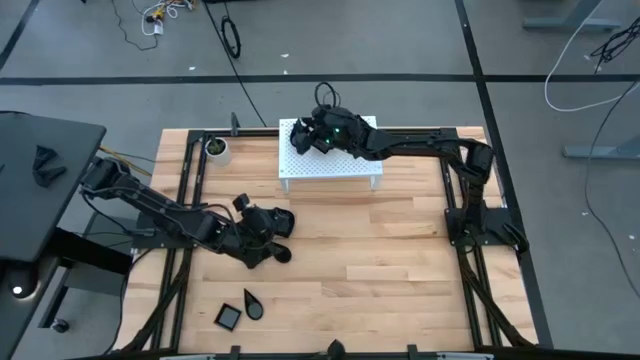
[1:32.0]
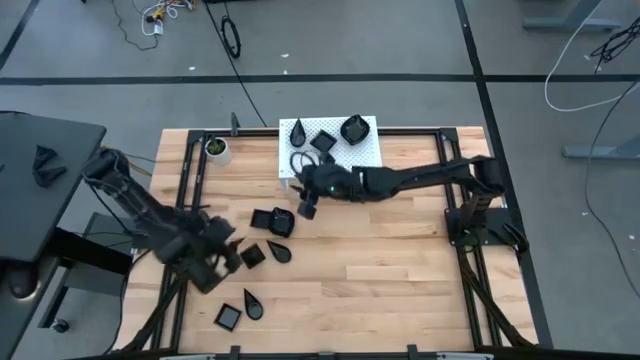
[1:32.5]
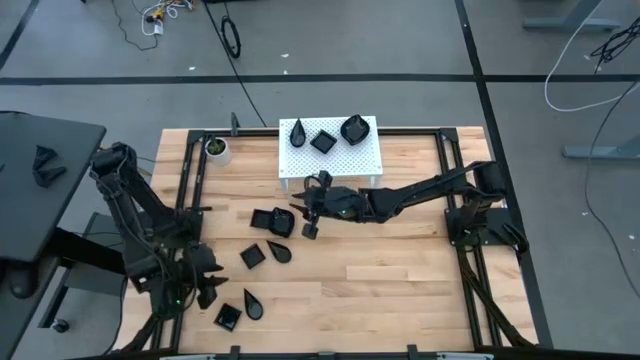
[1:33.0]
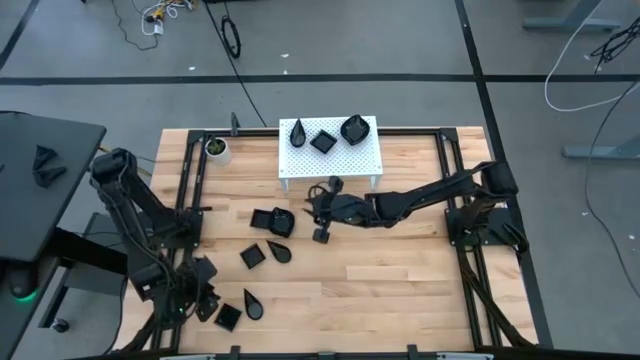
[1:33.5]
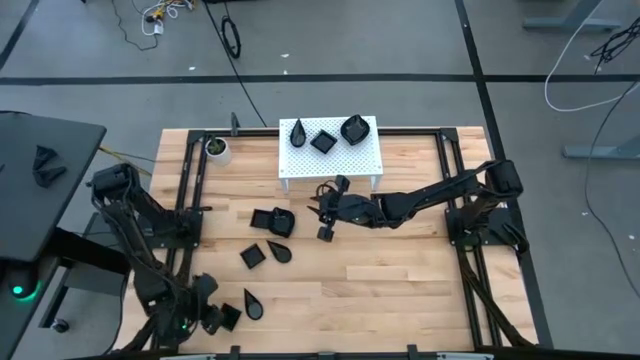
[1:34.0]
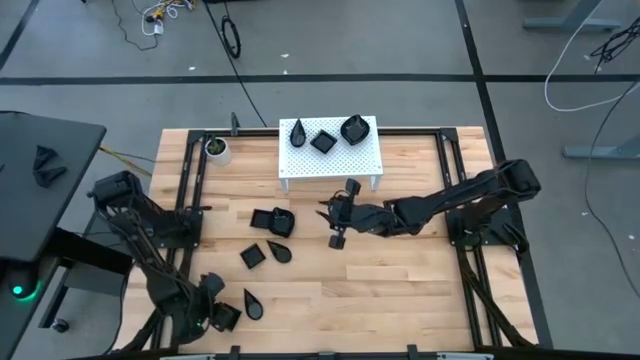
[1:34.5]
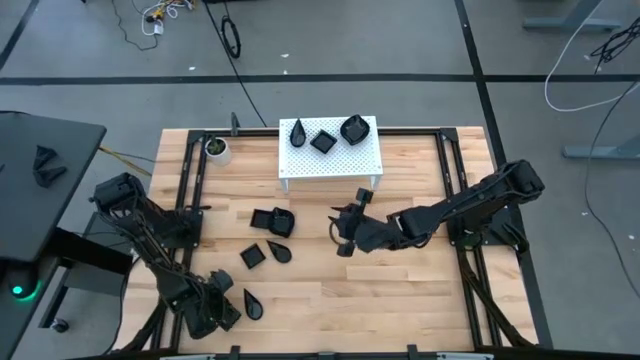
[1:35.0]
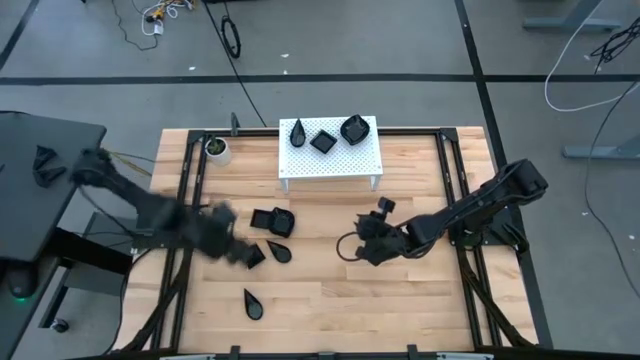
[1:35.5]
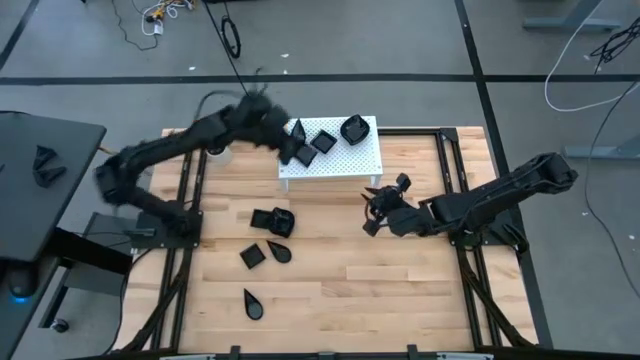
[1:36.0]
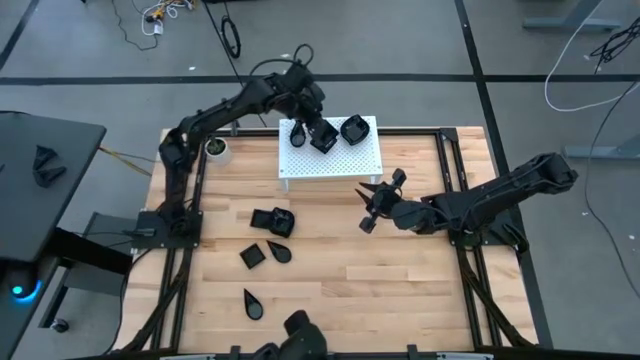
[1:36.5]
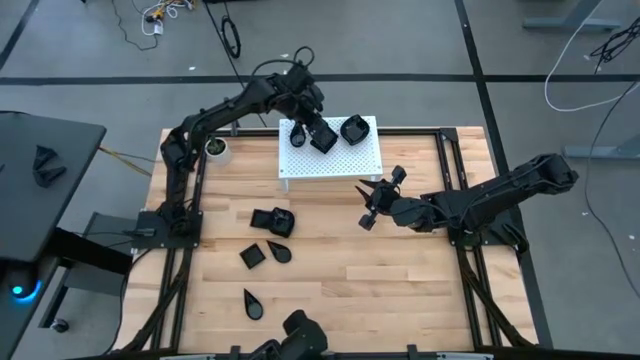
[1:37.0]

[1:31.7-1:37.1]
Task: Pick & Place Mini shaped plates
Stack the black square plate on top of the other black square plate on the shelf

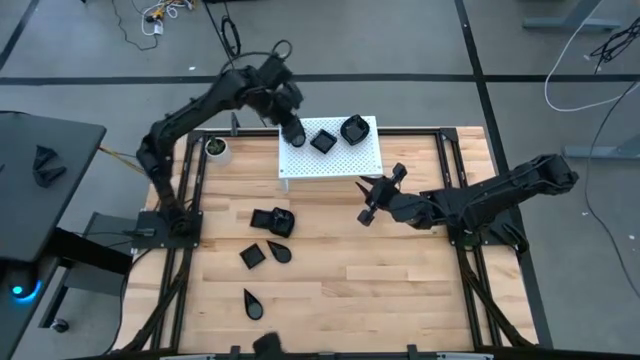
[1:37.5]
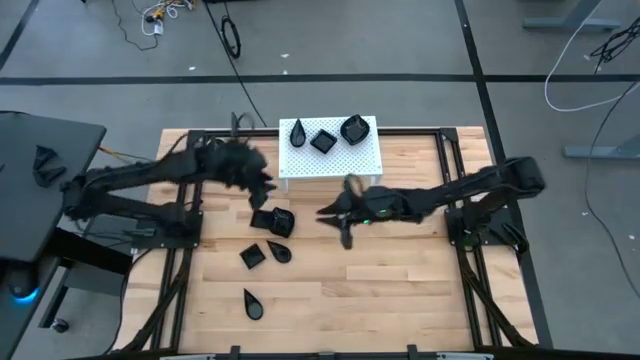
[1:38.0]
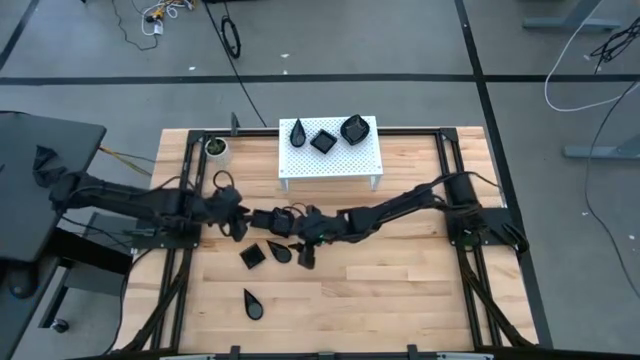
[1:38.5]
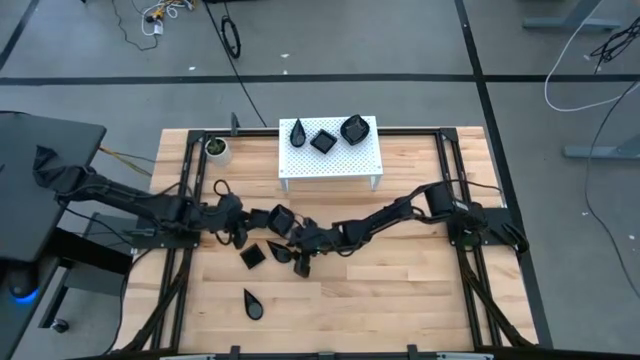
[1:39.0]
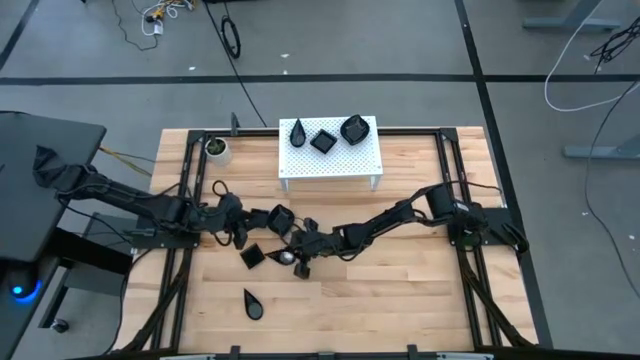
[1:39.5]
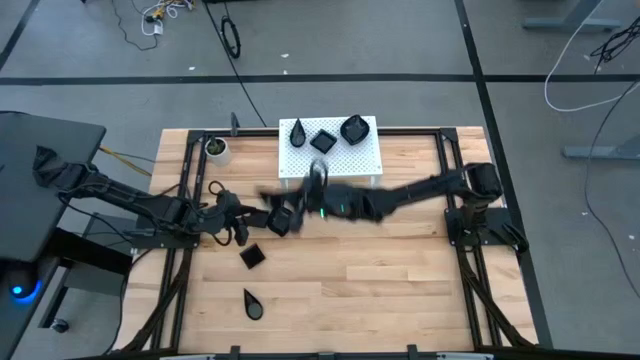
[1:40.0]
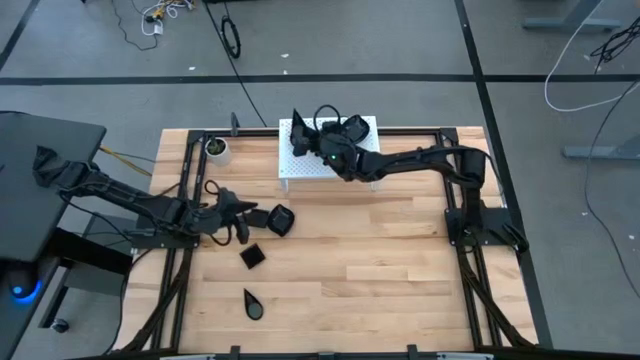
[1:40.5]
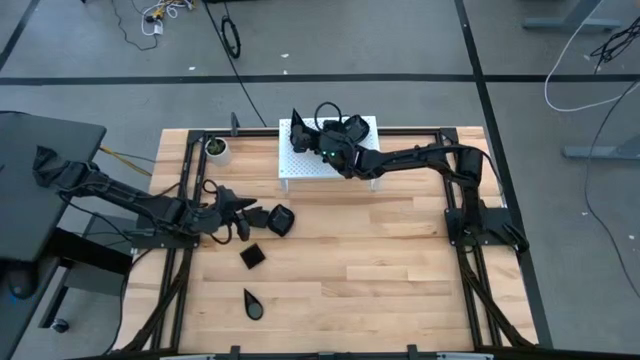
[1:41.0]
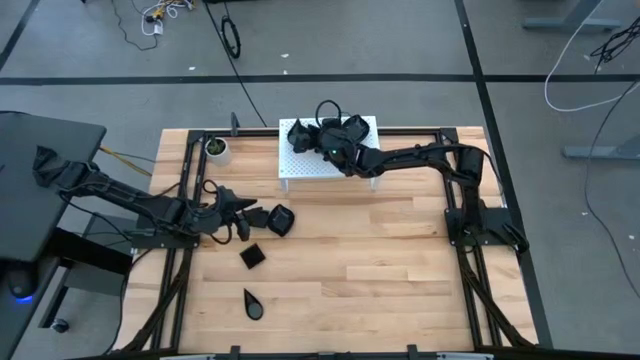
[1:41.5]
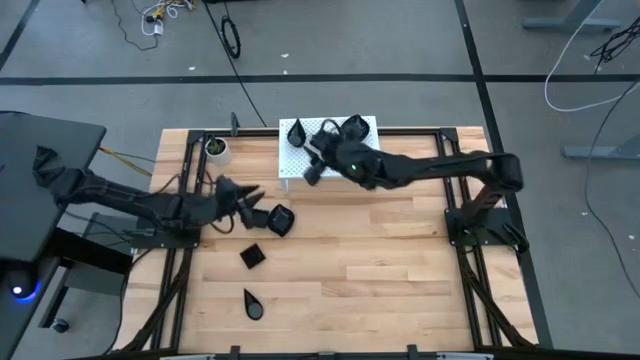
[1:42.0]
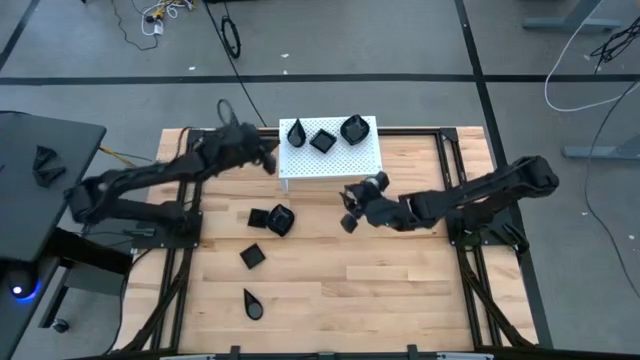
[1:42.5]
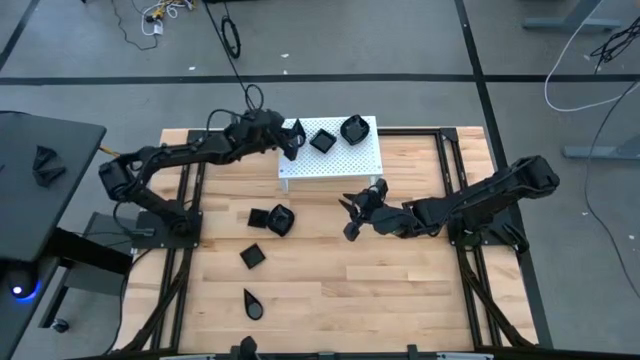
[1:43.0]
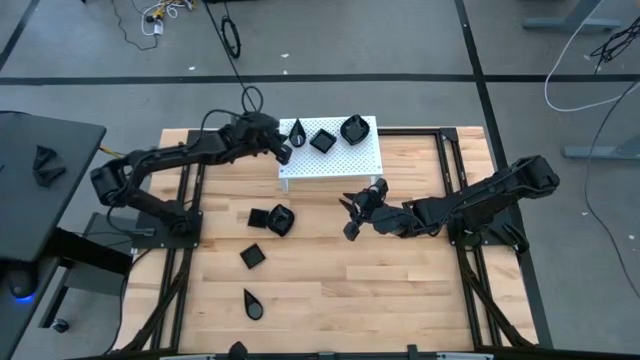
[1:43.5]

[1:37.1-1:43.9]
Stack the black drop-shaped plate on top of the other black drop-shaped plate on the shelf

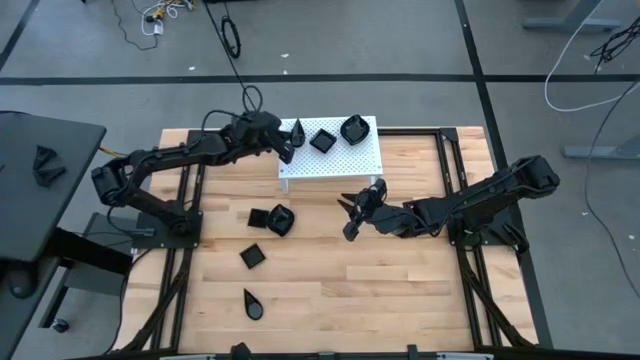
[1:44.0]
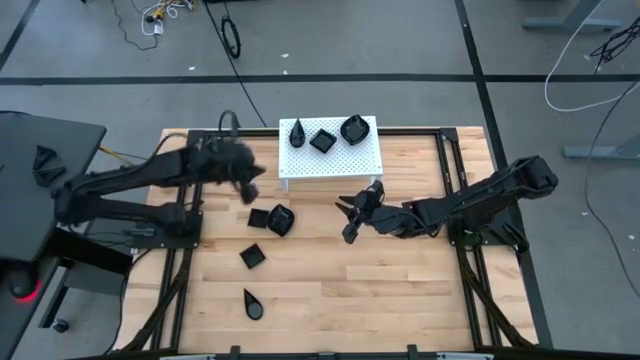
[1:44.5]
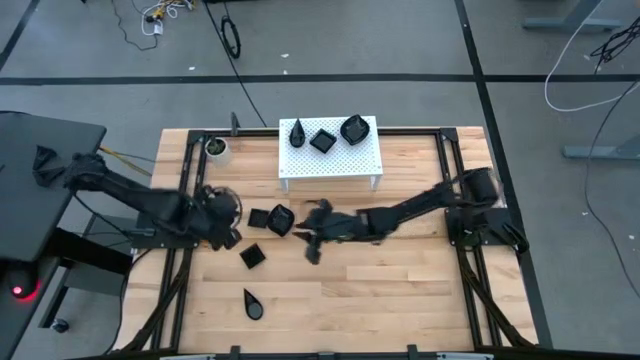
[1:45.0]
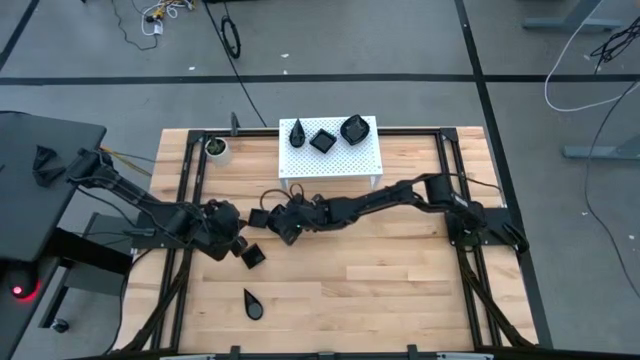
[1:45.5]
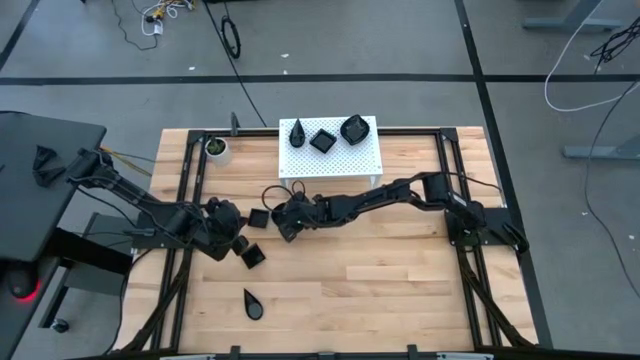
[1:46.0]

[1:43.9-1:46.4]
Stack the black leaf-shaped plate on top of the other black leaf-shaped plate on the shelf

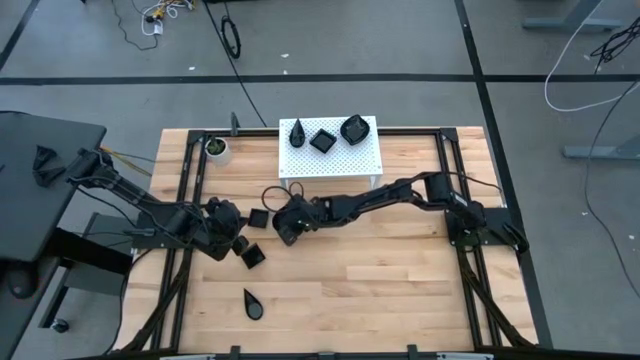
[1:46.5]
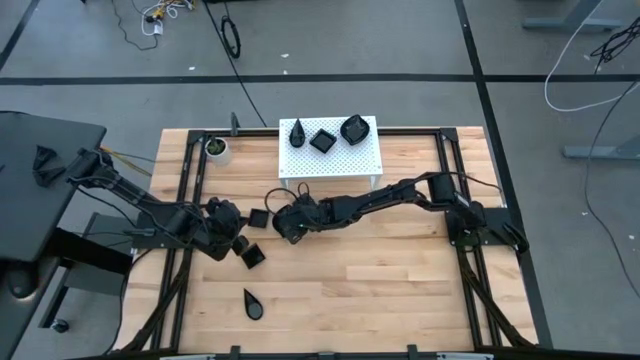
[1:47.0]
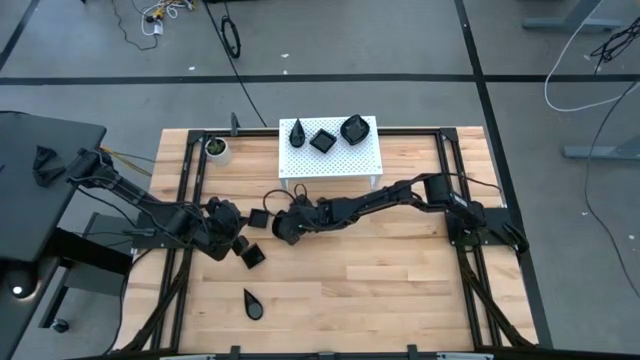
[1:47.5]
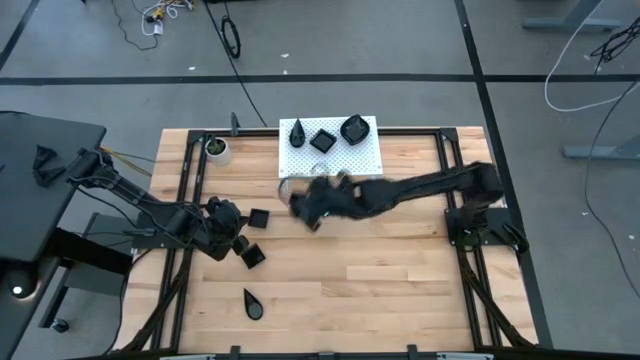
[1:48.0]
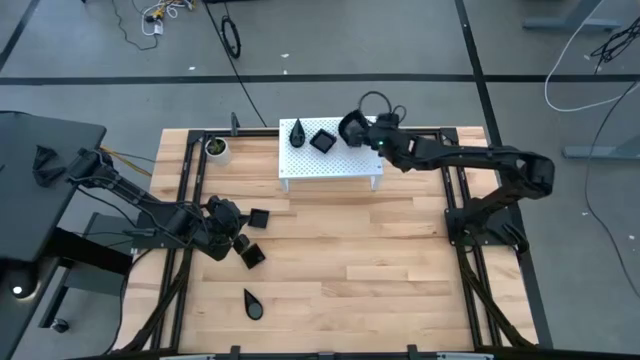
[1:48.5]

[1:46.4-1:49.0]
Stack the black leaf-shaped plate on top of the other black leaf-shaped plate on the shelf

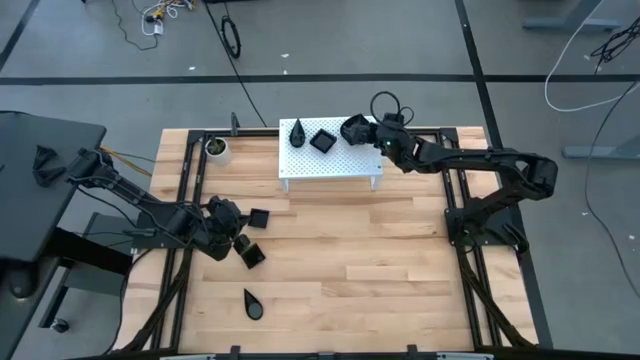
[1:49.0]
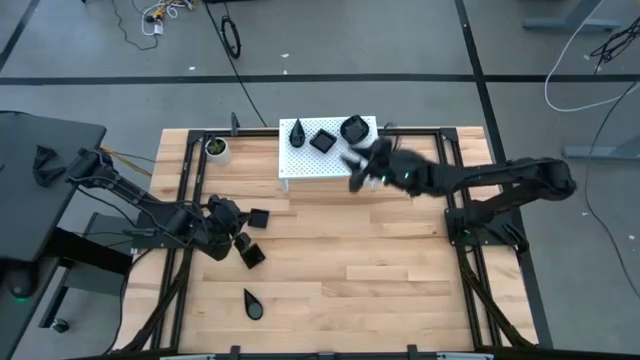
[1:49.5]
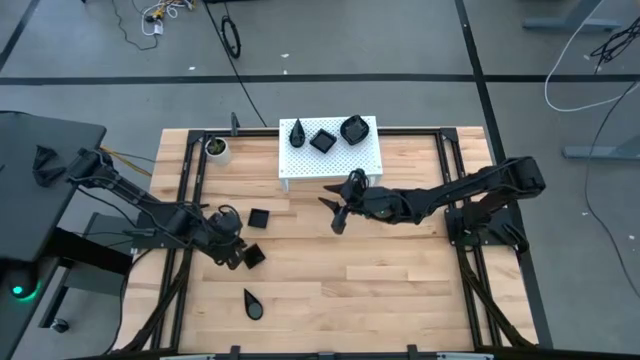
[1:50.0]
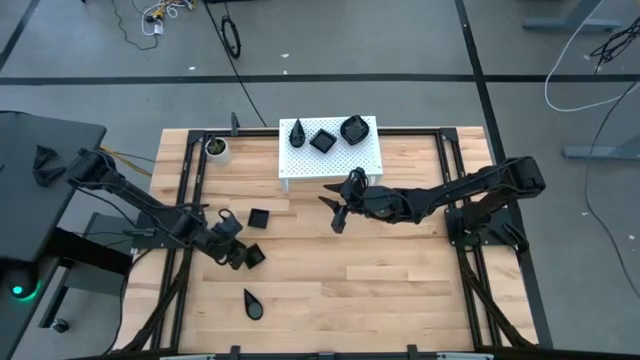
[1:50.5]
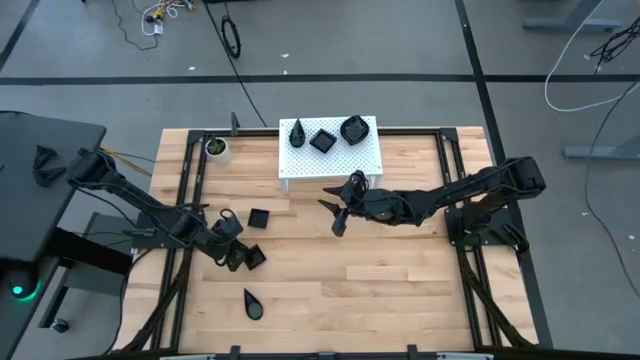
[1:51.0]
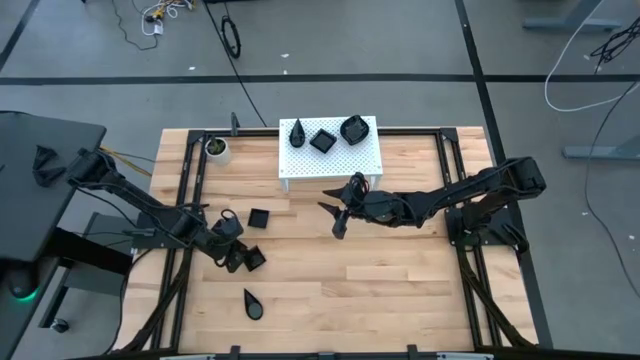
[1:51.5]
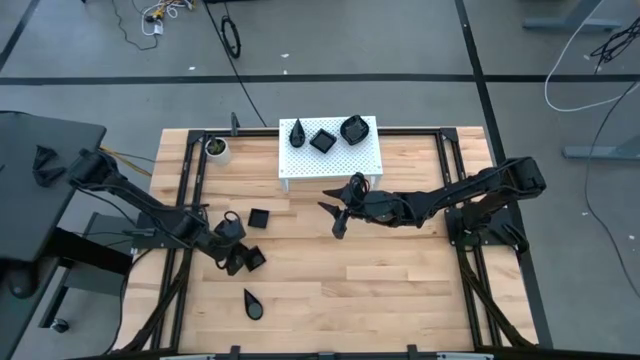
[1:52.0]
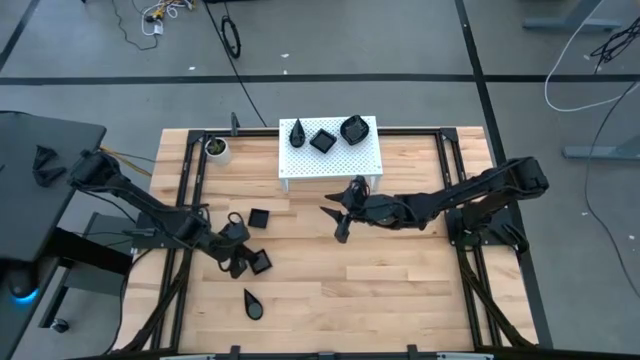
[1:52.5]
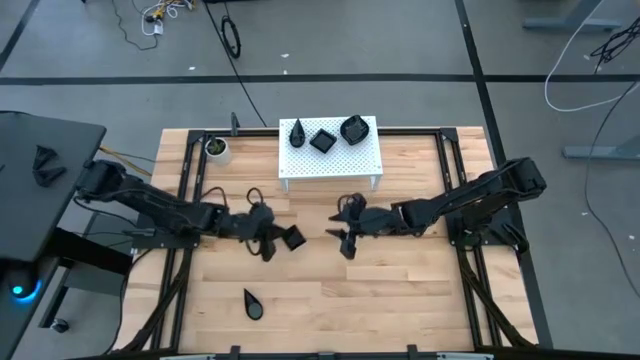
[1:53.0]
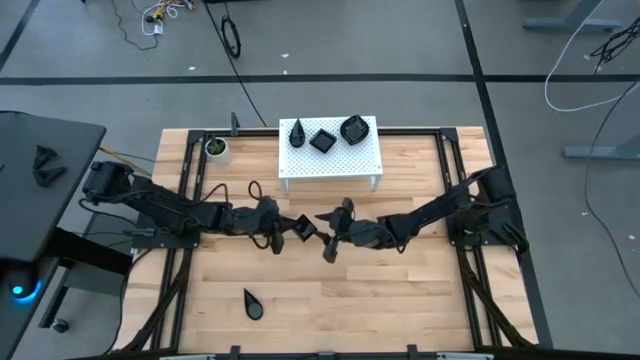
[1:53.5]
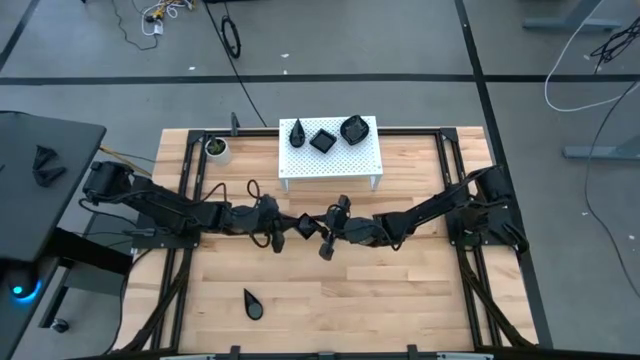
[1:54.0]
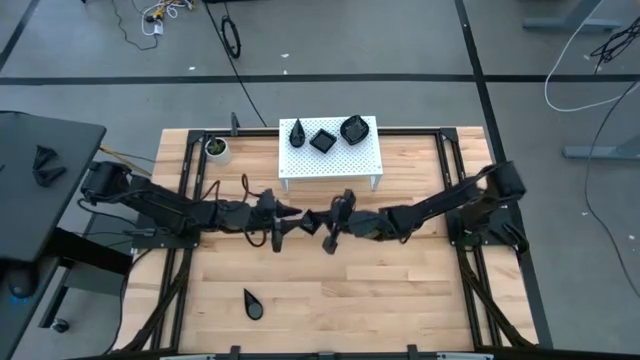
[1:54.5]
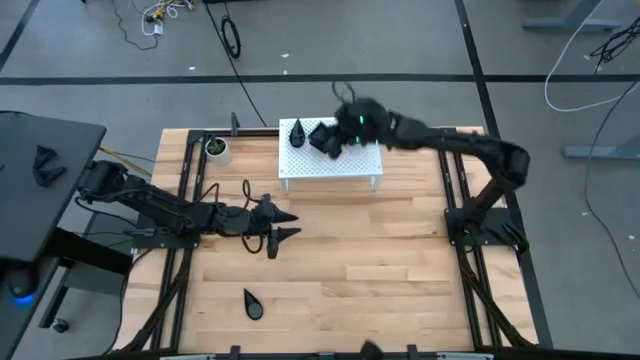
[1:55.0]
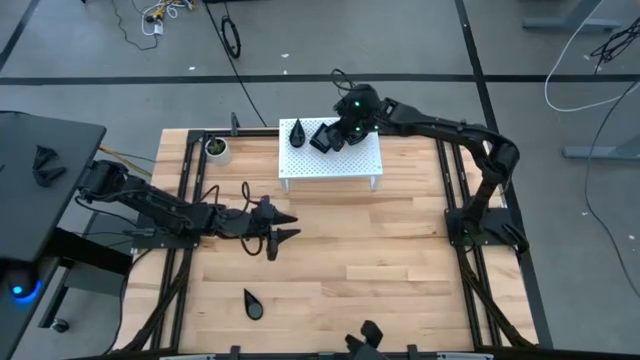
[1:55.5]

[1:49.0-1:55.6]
Stack the black square plate on top of the other black square plate on the shelf
